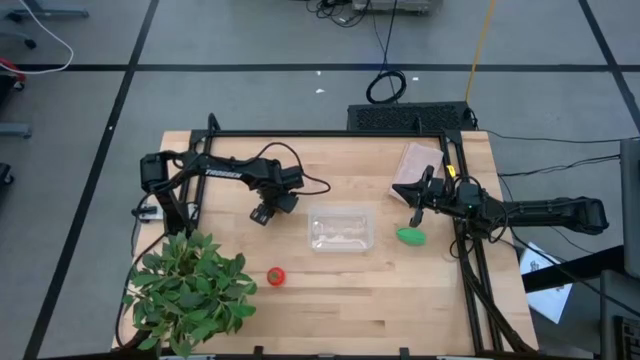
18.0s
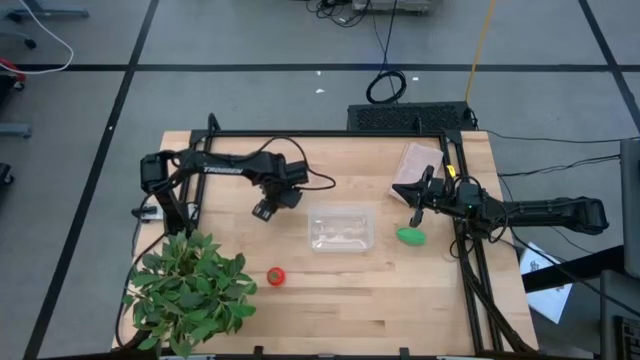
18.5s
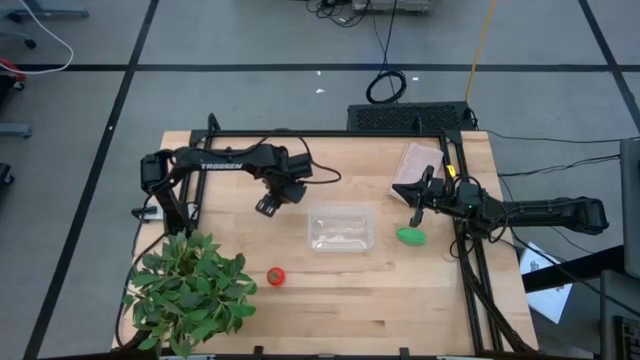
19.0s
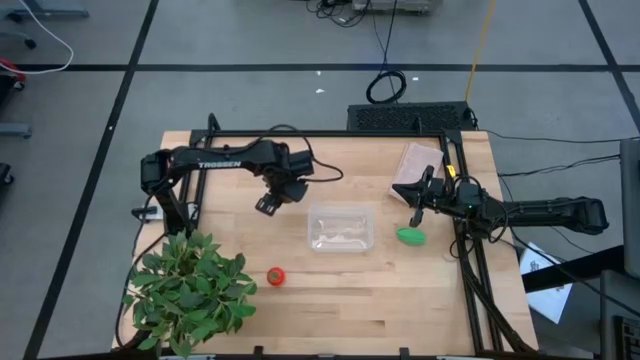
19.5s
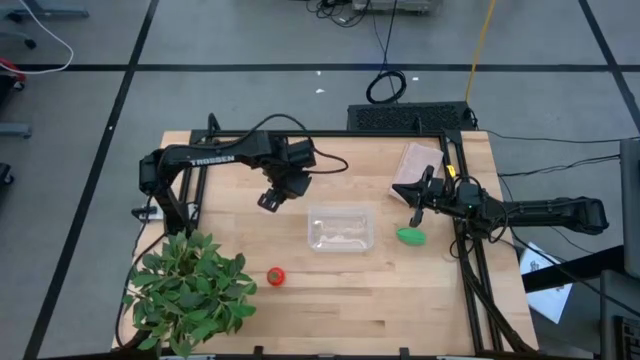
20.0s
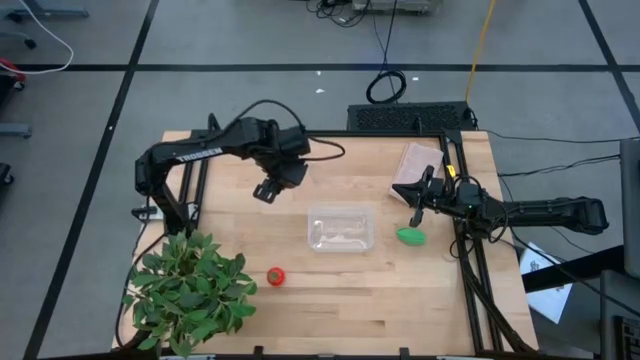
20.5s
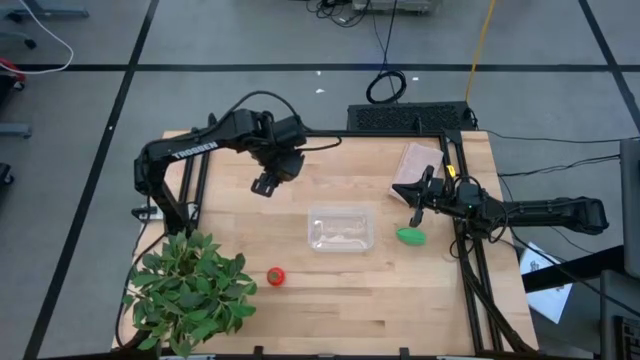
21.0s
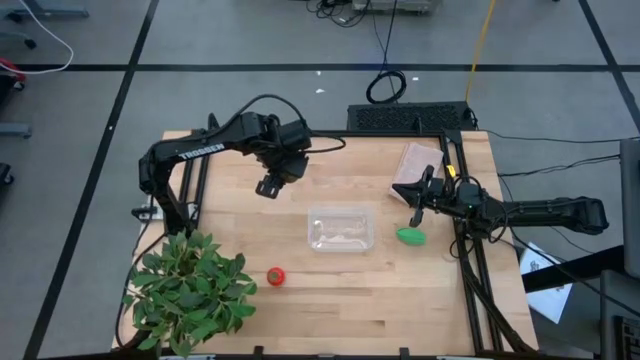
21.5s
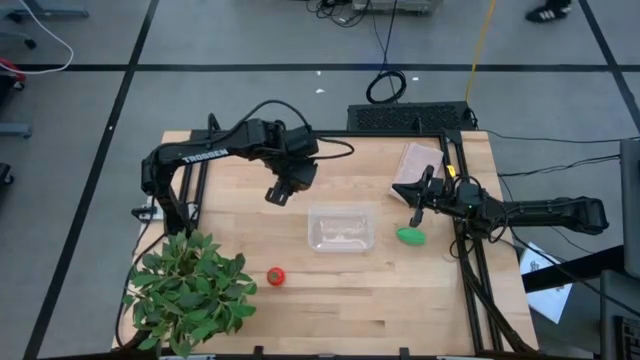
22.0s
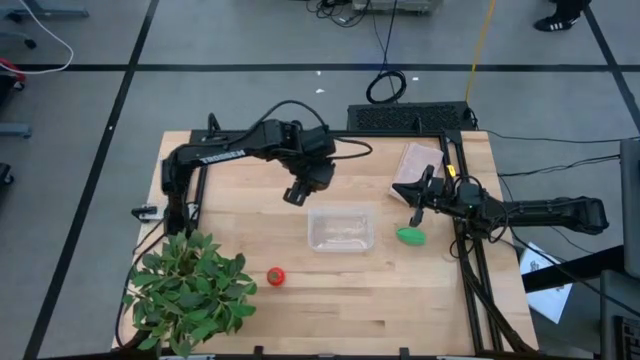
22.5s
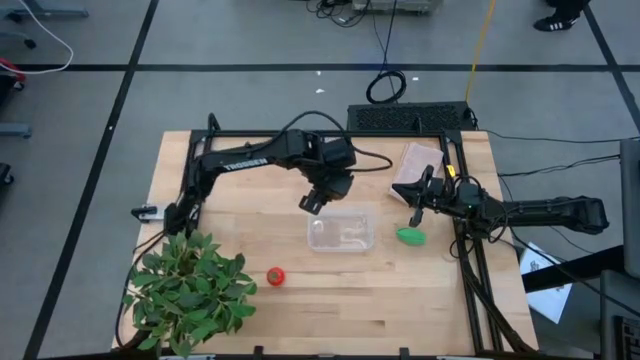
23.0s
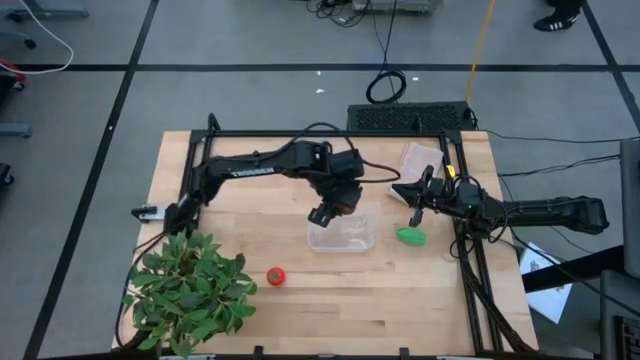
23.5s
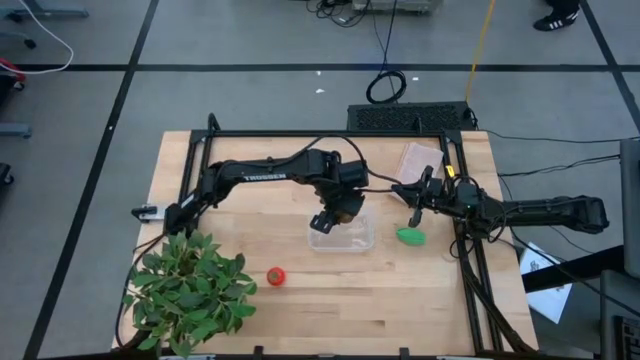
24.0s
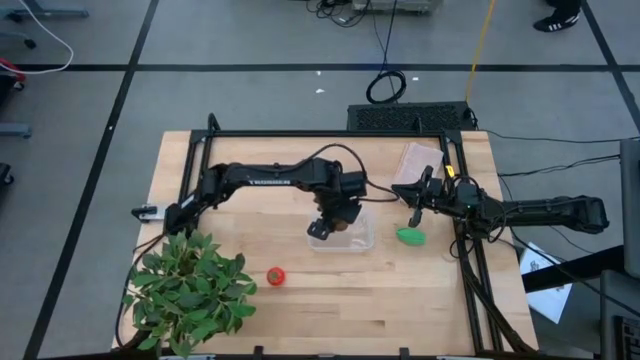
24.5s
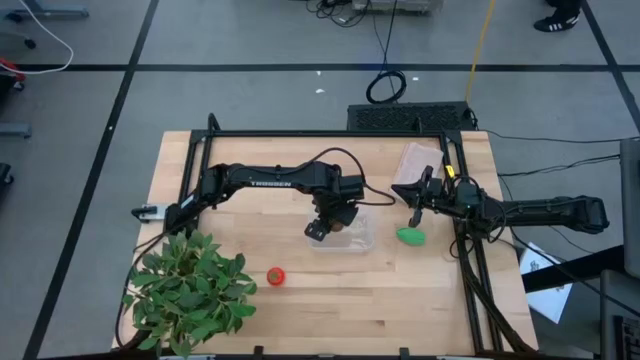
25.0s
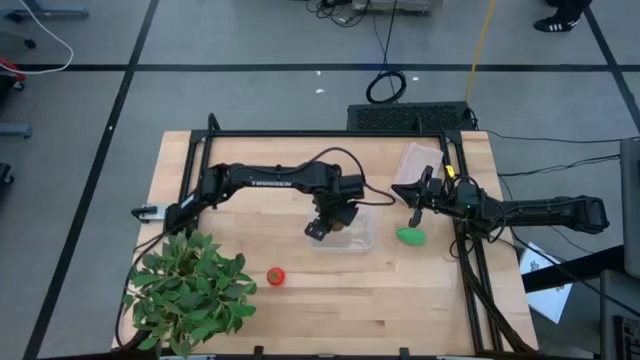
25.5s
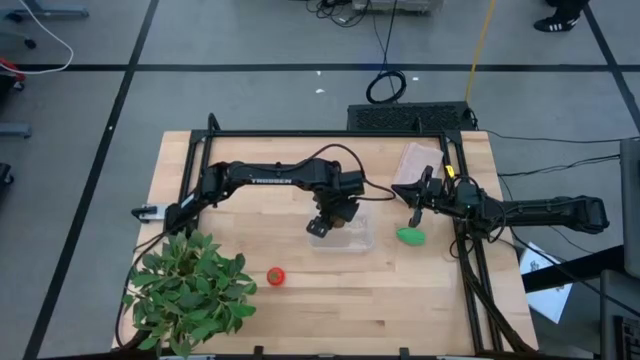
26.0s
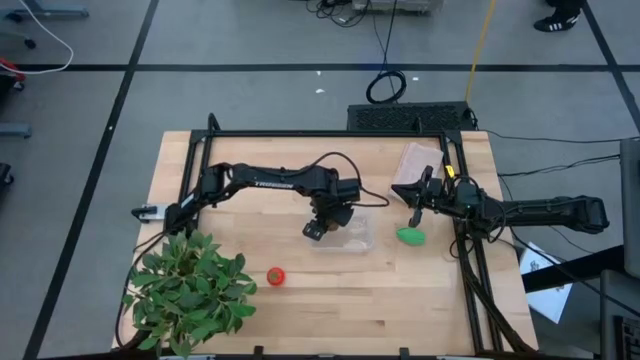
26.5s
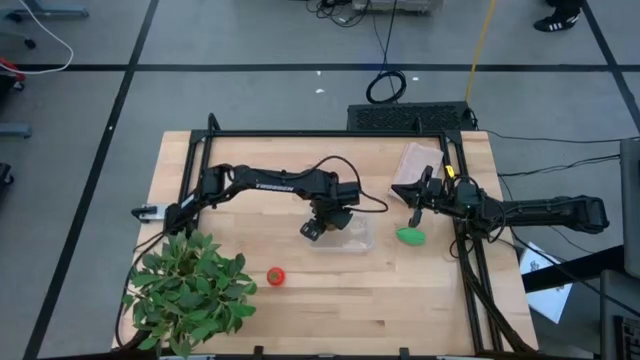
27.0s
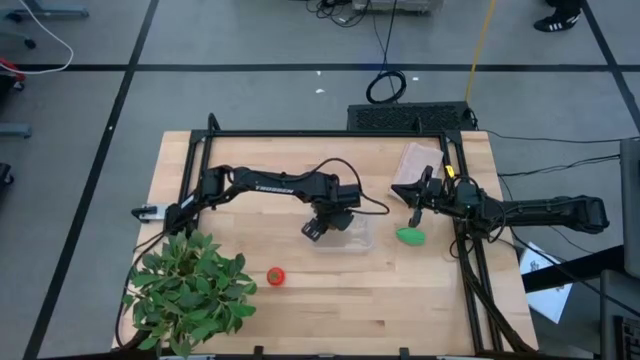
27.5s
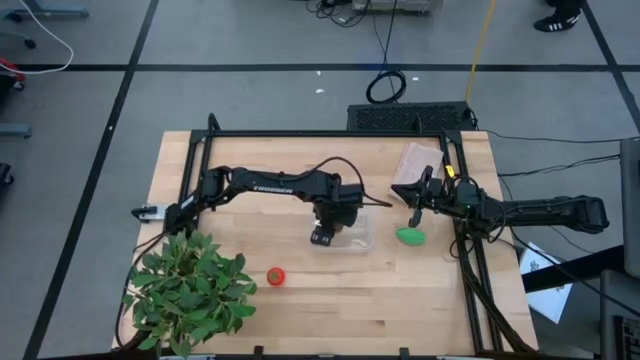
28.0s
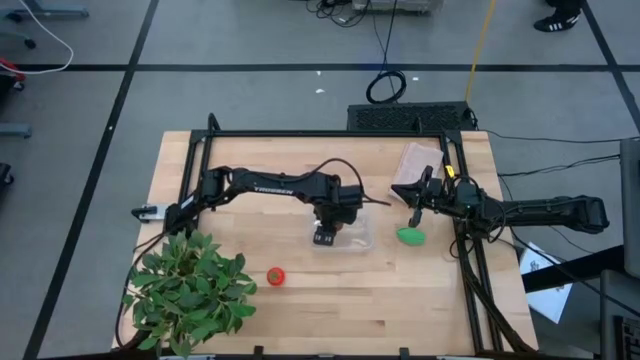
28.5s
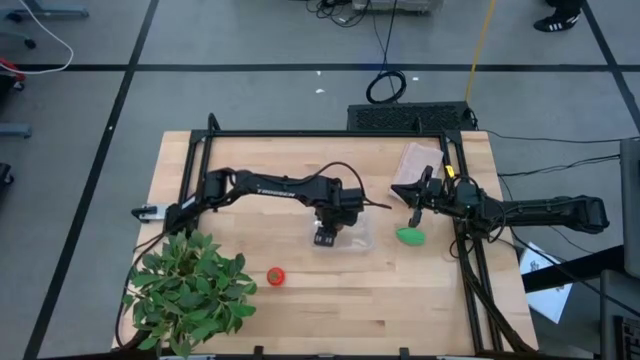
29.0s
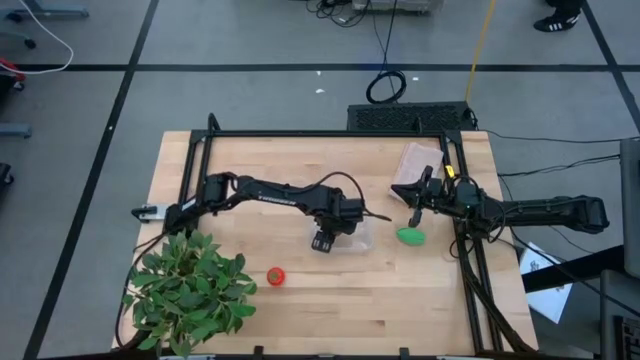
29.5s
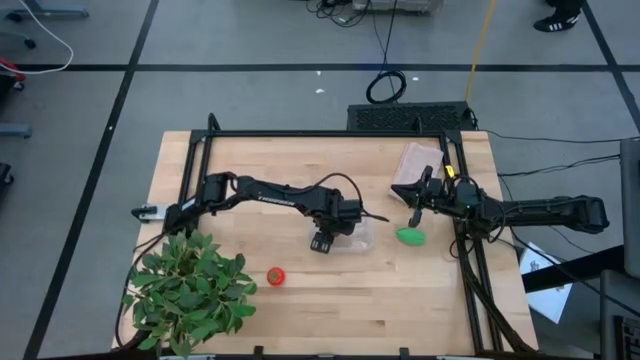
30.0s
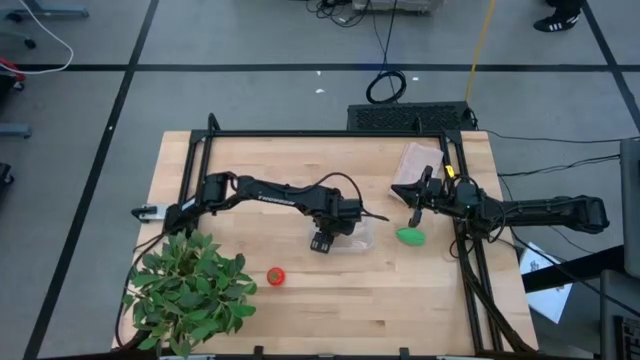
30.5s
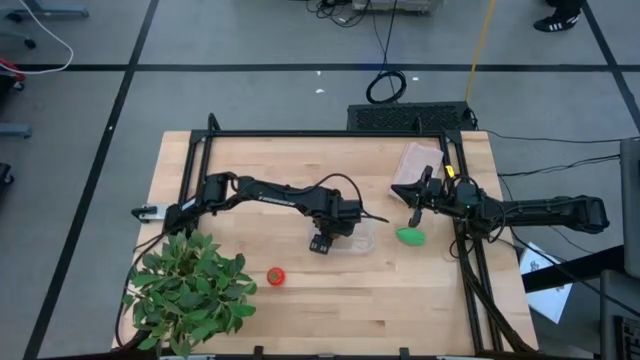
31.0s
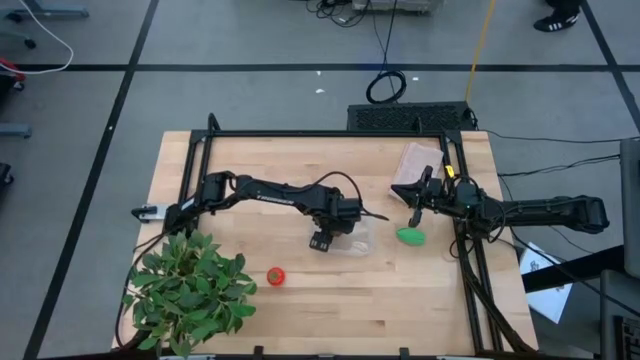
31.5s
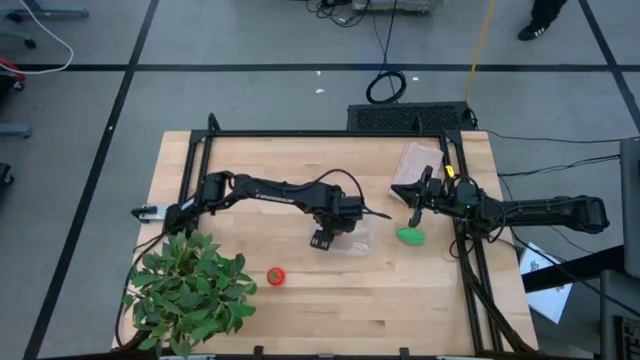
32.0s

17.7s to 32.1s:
Task: Pick and placing Produce into tupperware
Put the brown kiwi into the transparent bin
